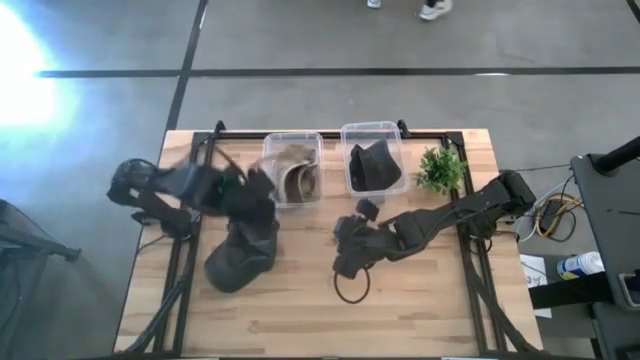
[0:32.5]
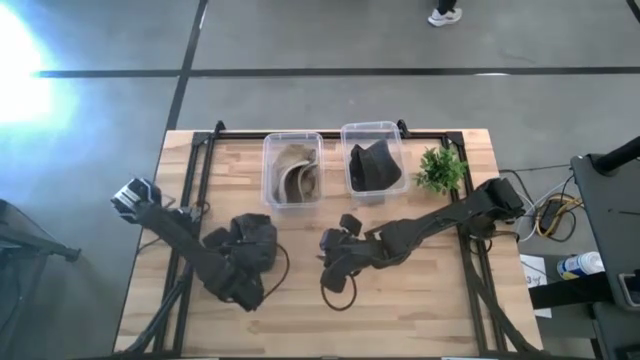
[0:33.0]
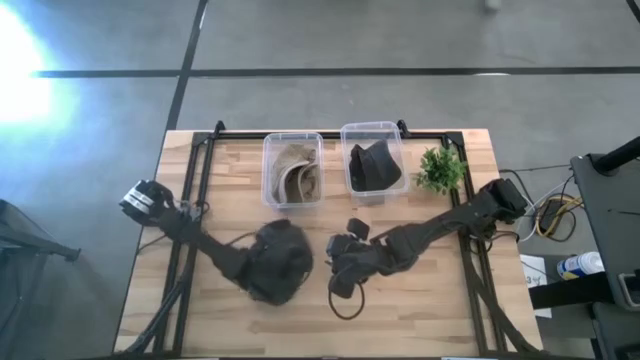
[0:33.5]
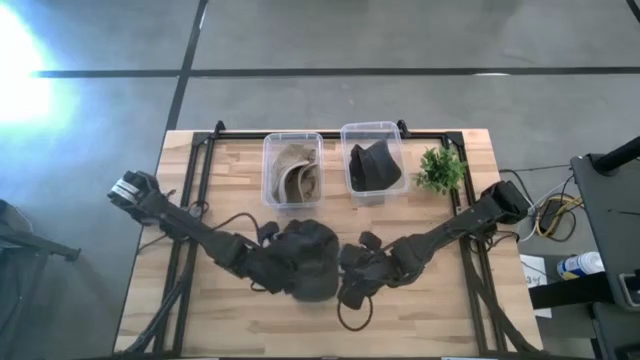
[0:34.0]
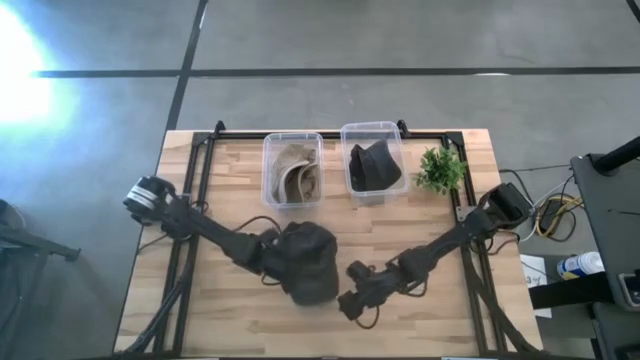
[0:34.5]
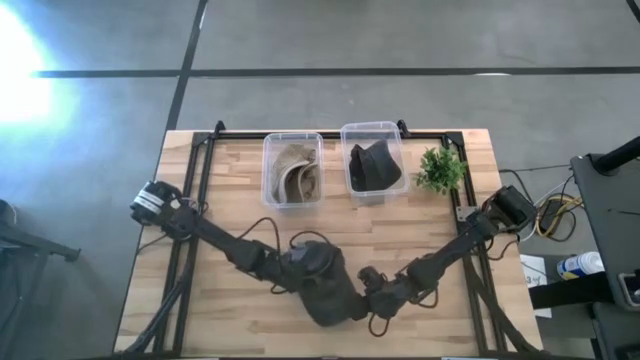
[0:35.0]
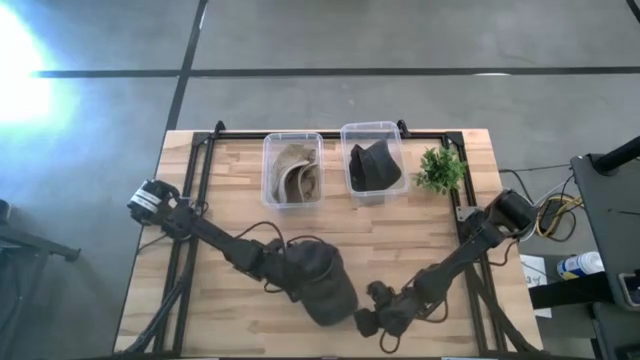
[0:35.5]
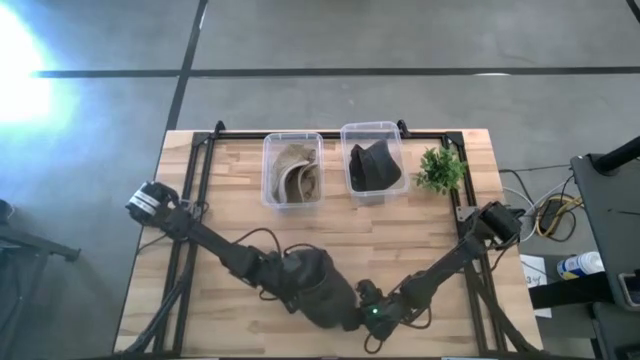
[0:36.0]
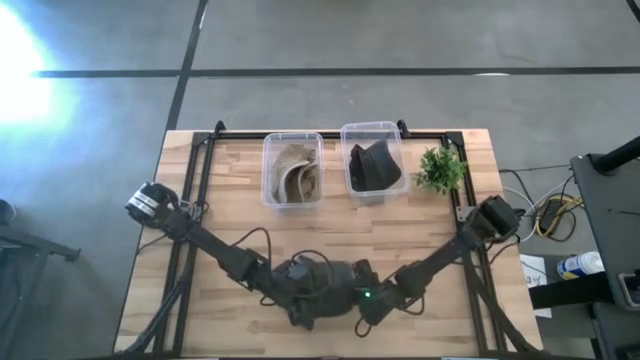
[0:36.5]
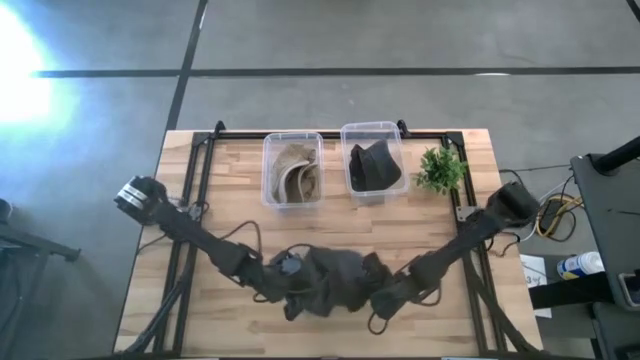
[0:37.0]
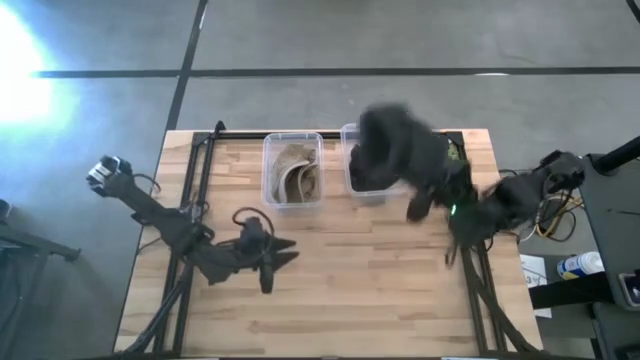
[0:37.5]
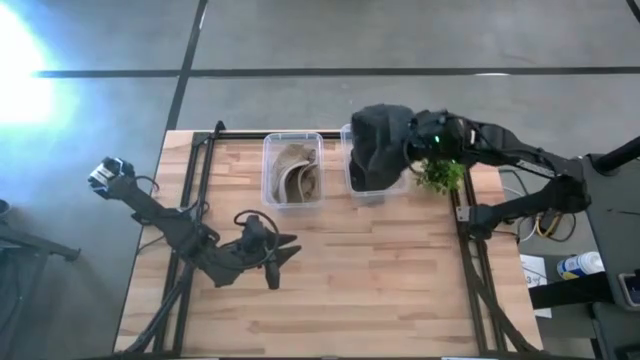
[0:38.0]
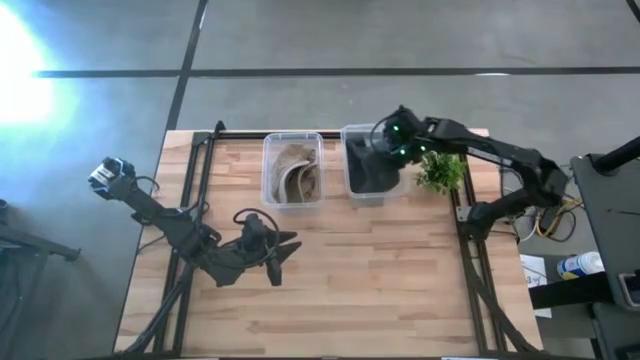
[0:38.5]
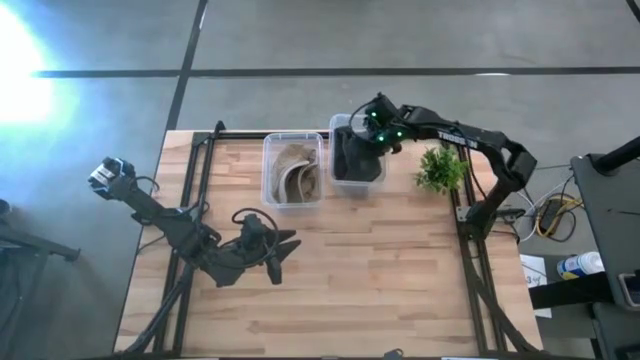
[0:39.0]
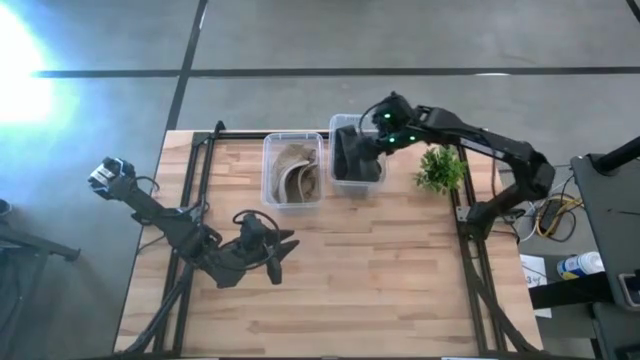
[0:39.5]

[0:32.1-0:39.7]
Task: Pick & Place hat
Put the black cap into the right transparent bin

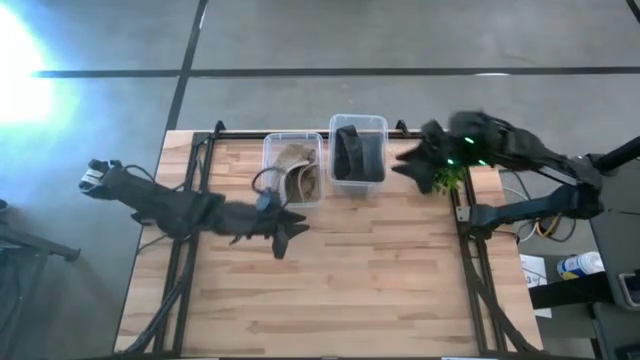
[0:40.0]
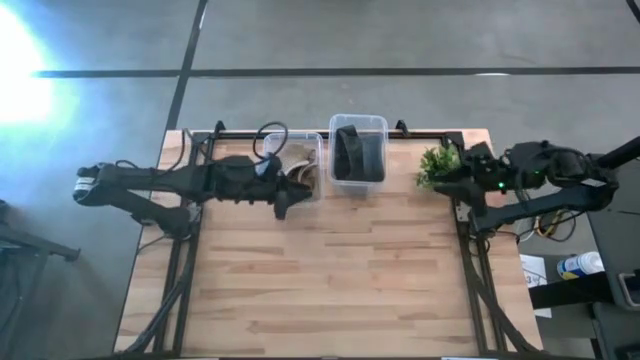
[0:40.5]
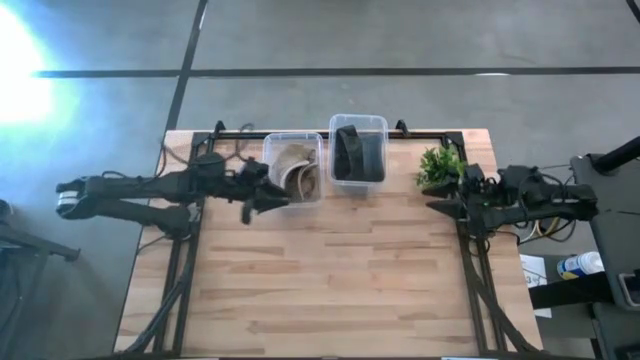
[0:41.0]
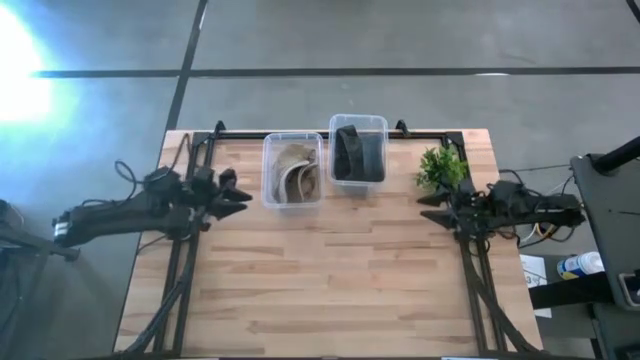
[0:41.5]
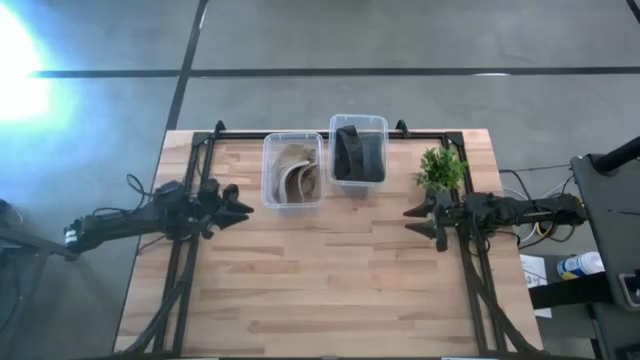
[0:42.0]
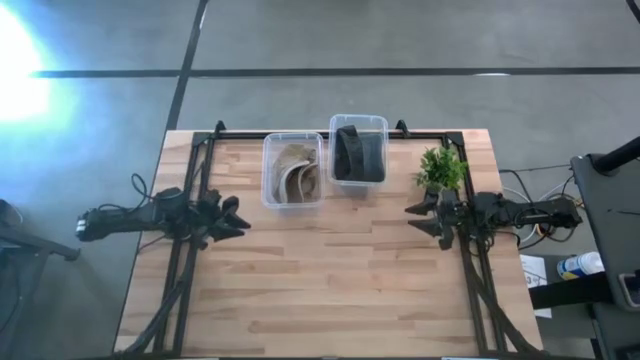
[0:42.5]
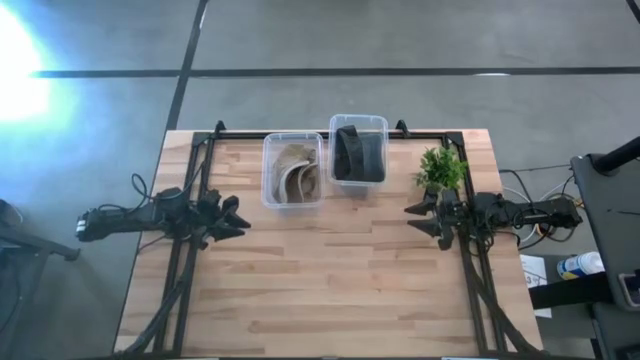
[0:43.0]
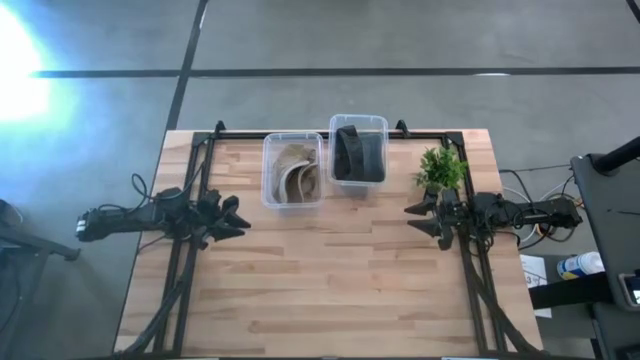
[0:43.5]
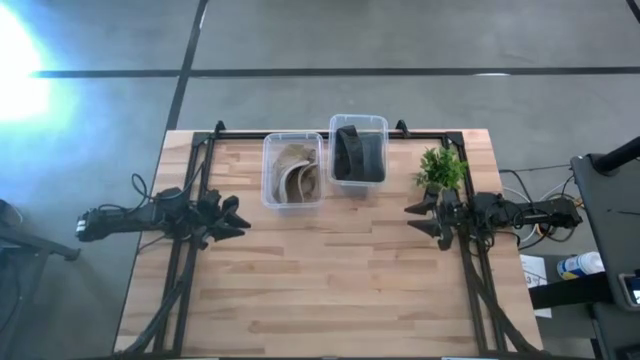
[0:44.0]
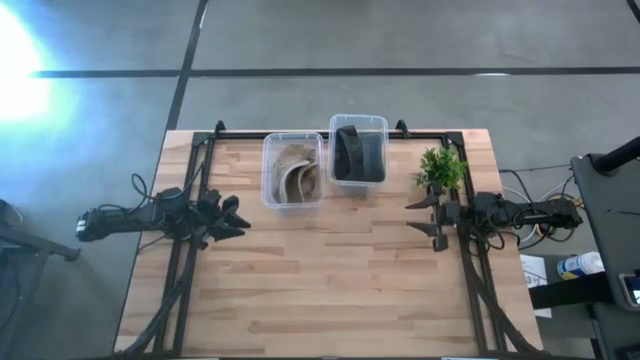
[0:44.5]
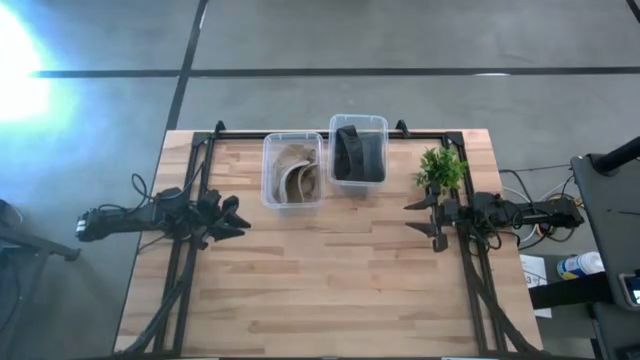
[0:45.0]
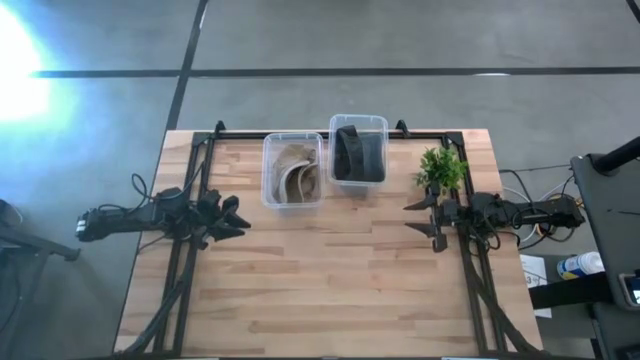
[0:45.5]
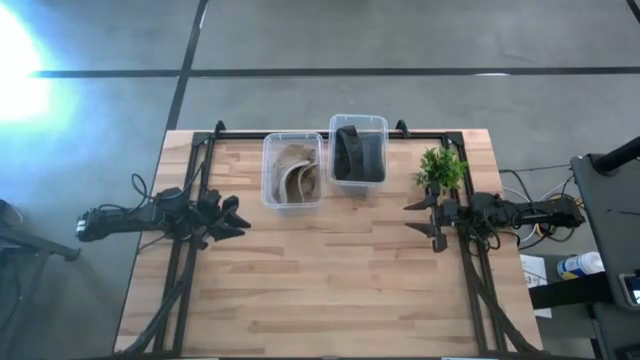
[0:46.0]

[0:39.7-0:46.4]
Return to Home Position

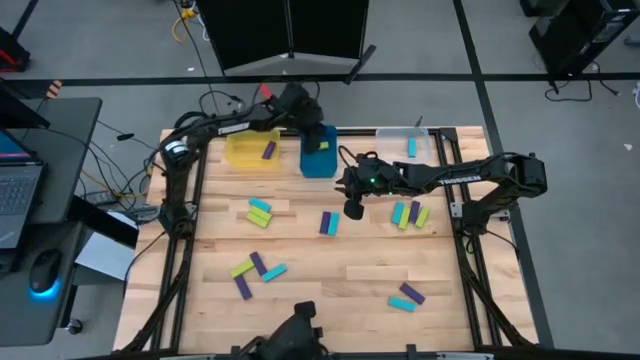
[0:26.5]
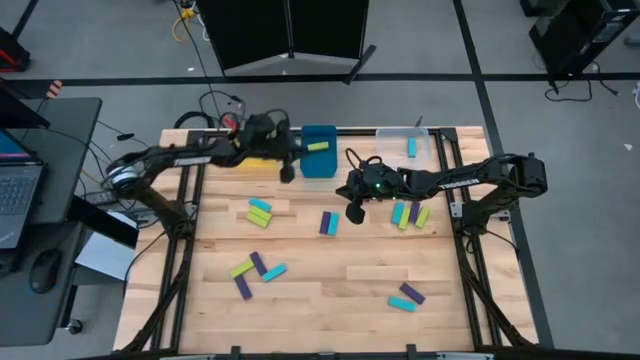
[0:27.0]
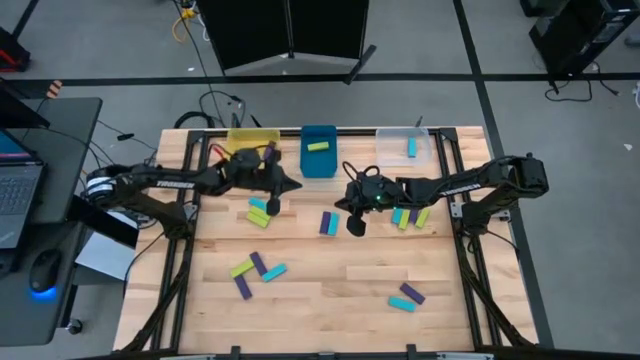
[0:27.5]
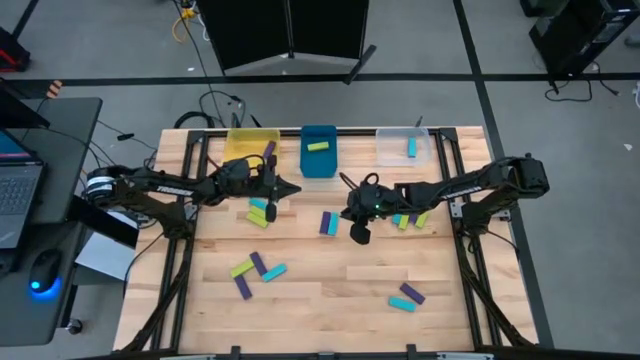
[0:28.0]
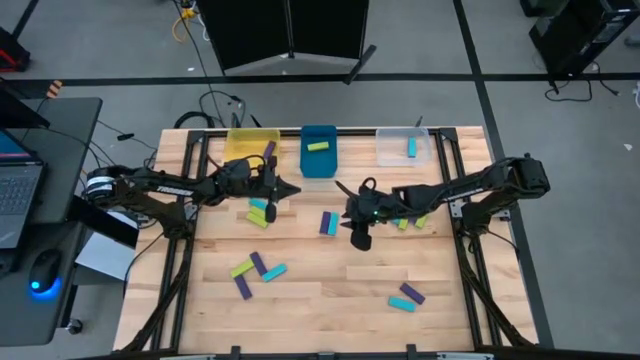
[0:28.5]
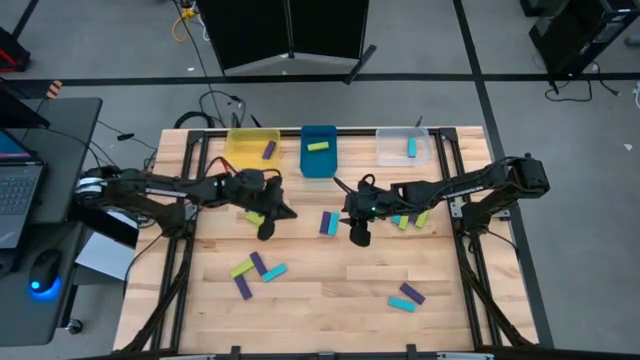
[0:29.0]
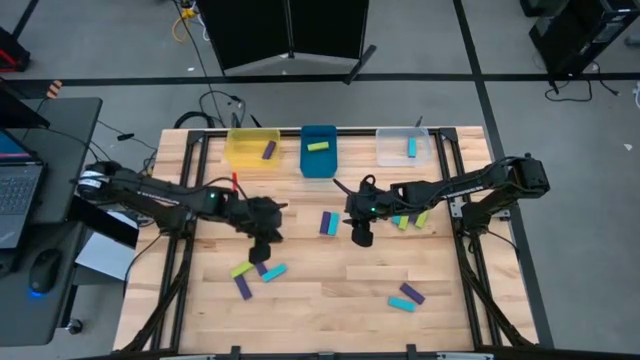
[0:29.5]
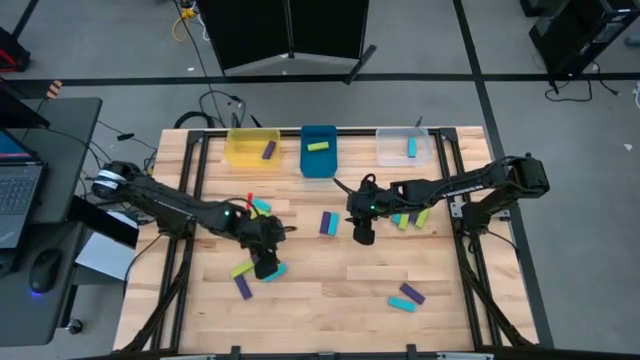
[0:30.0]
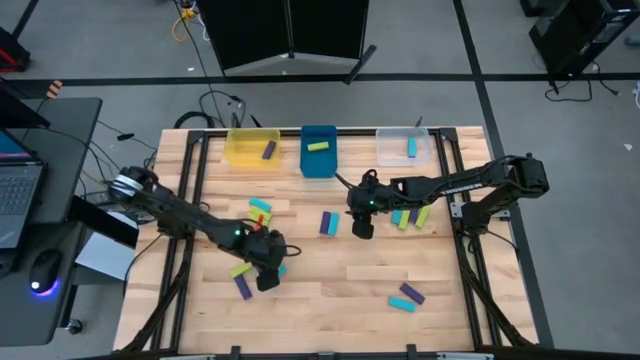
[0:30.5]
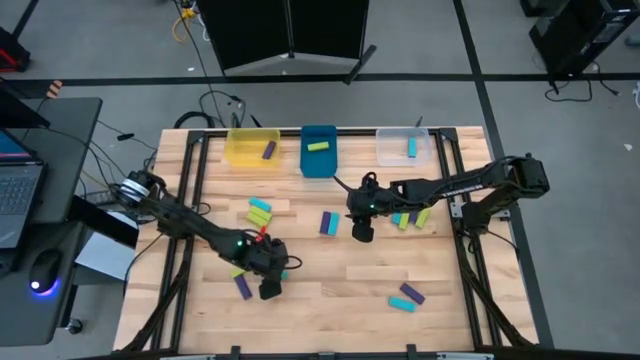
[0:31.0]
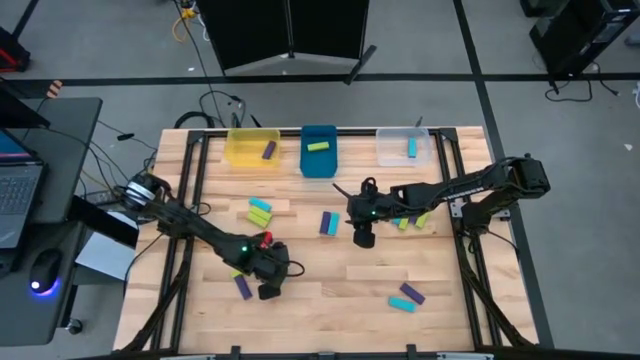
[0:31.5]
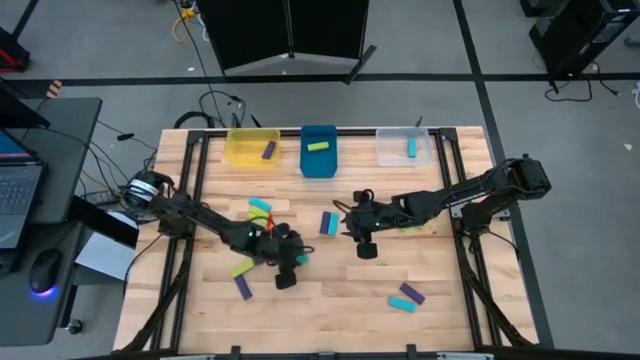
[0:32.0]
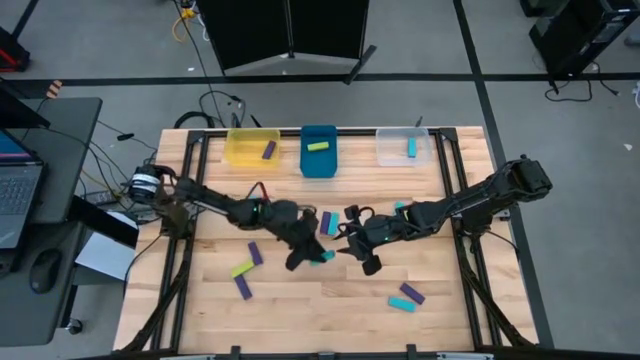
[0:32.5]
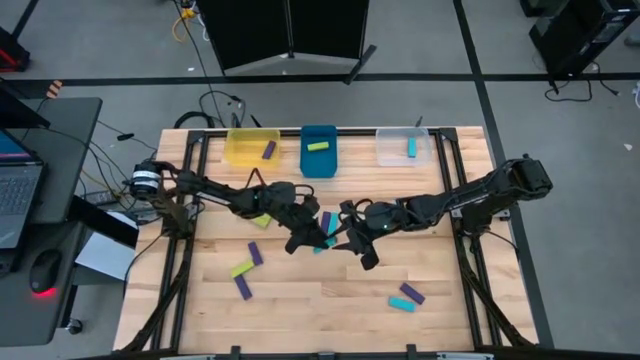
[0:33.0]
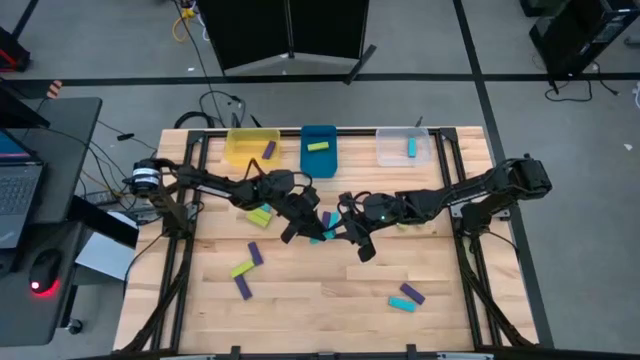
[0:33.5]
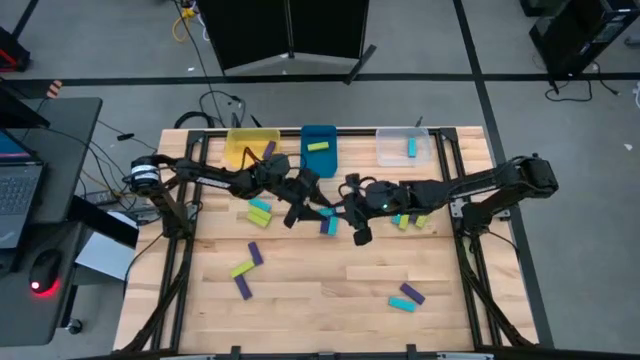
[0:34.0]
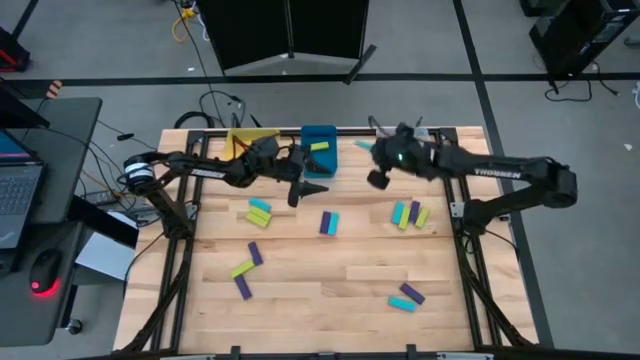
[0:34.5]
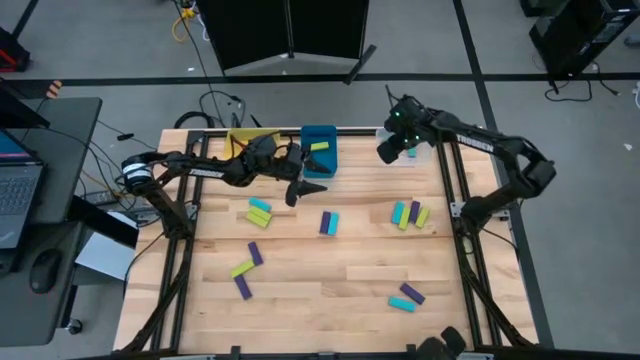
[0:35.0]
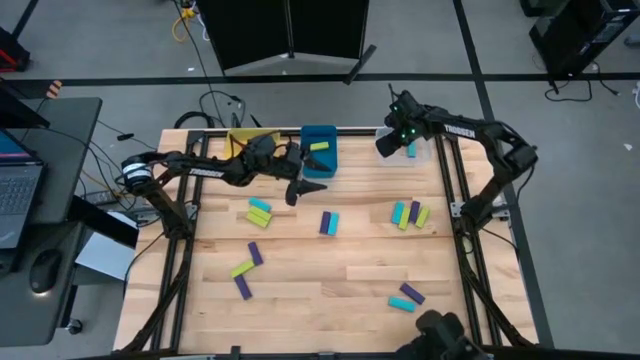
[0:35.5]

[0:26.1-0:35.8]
Task: Sort blocks
Put the blue block into the transparent bin
